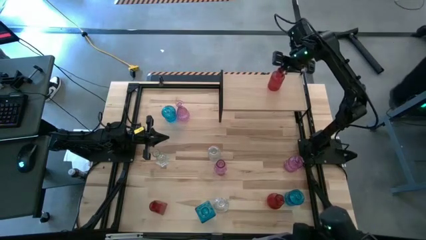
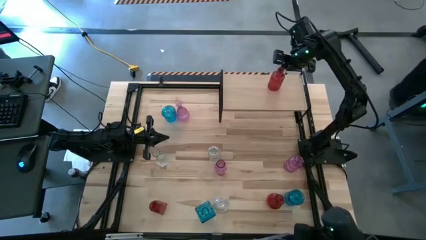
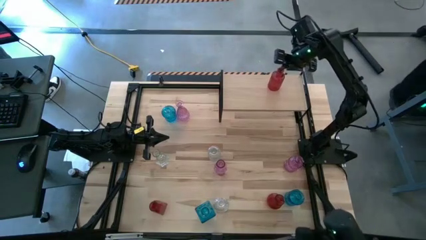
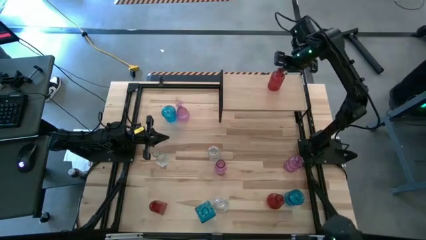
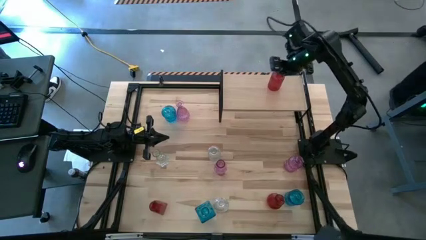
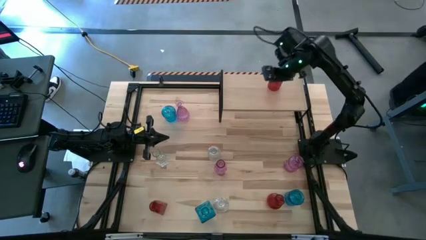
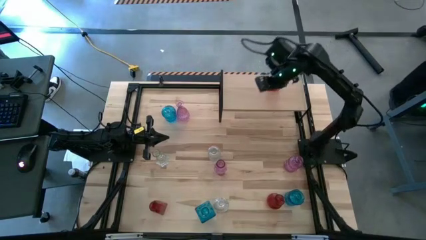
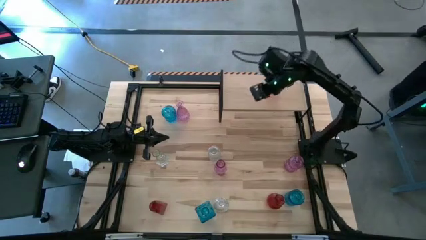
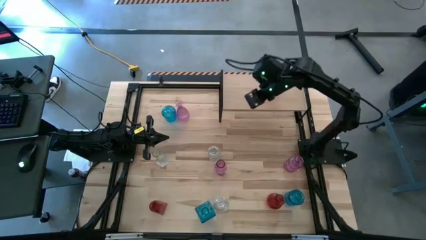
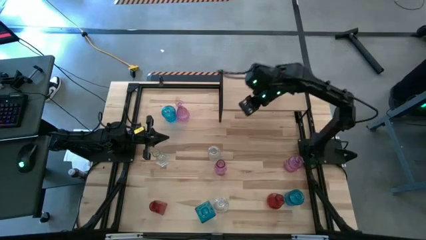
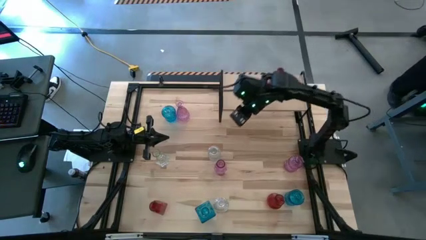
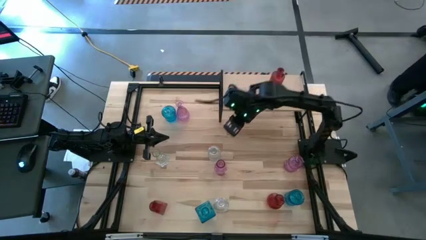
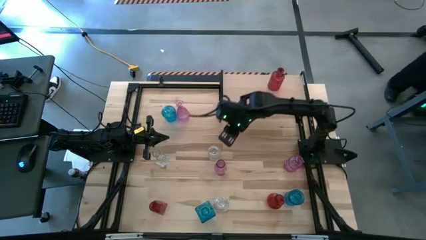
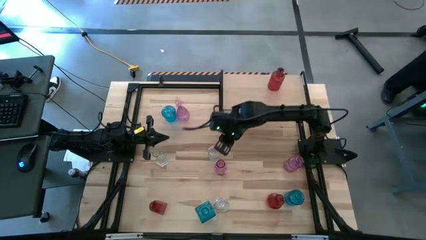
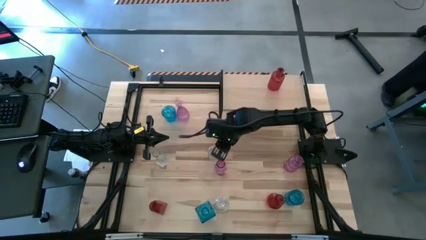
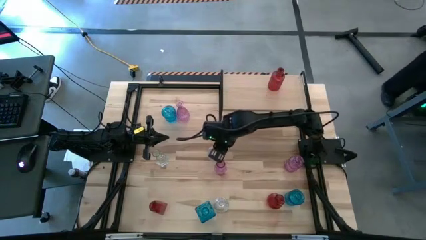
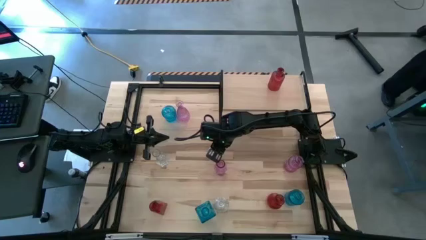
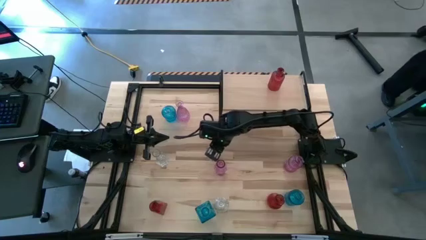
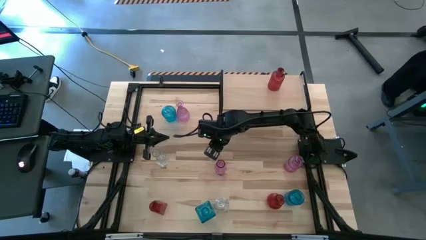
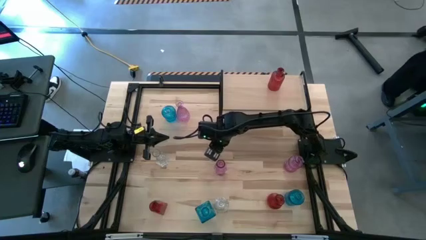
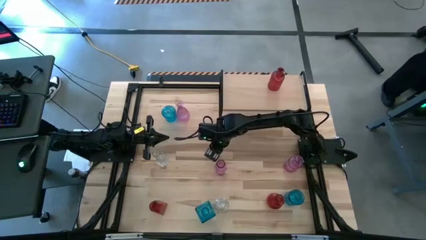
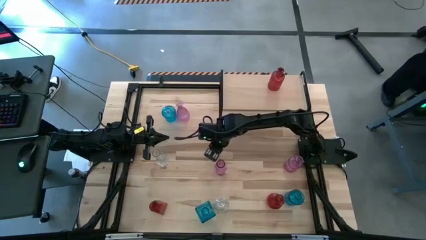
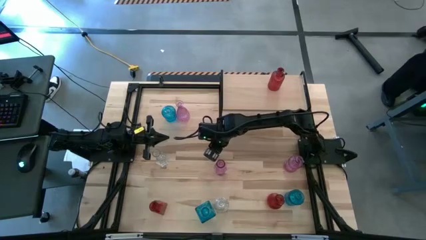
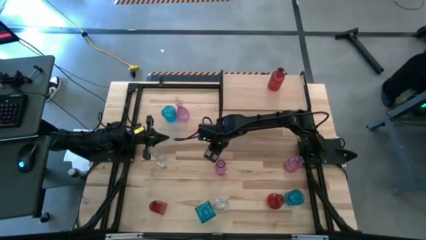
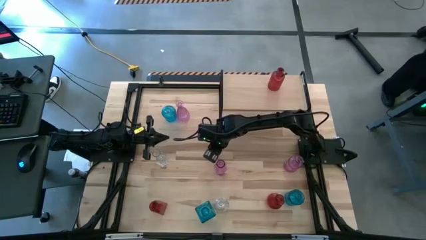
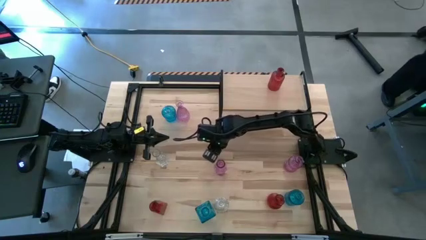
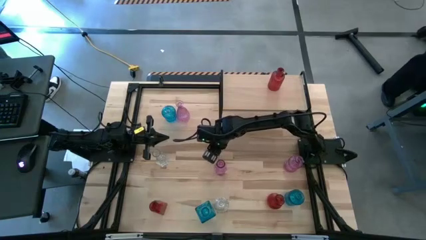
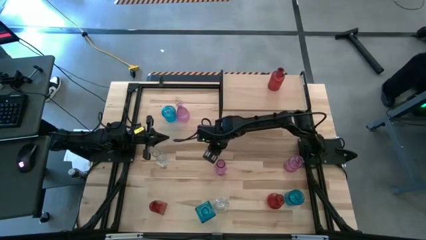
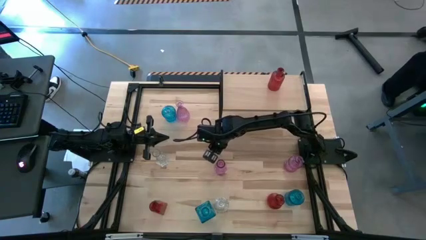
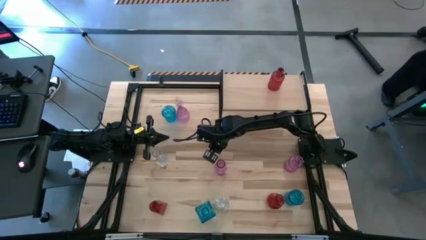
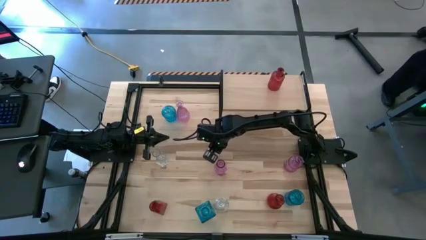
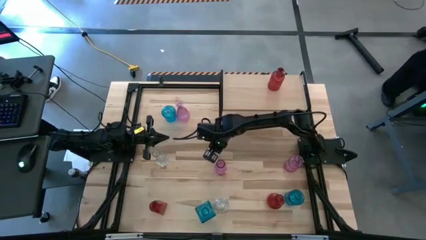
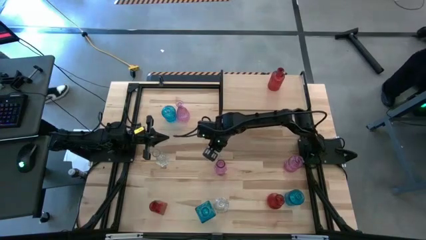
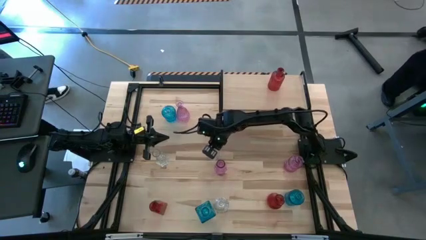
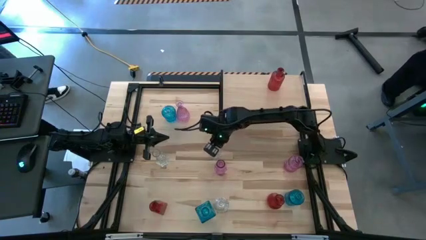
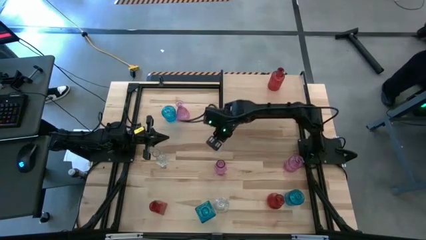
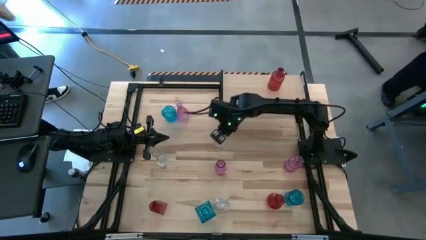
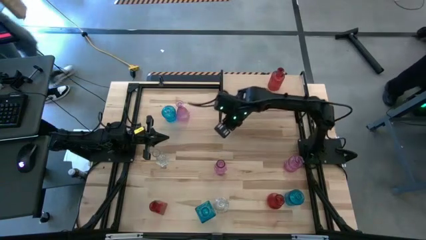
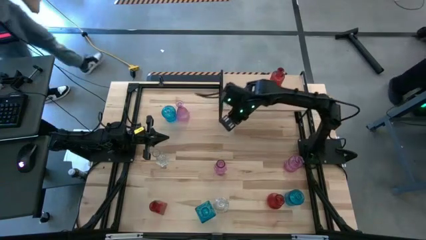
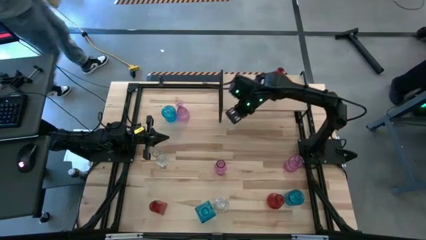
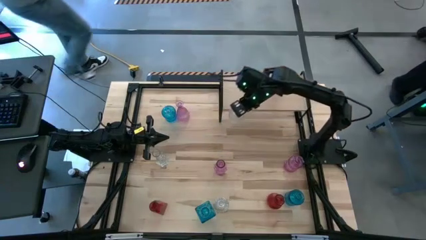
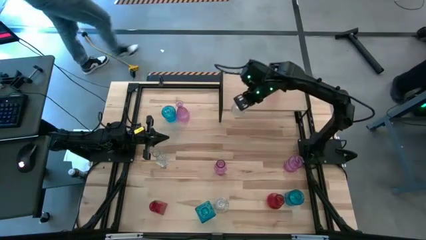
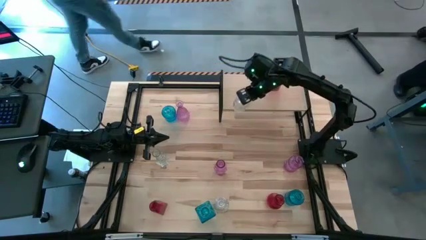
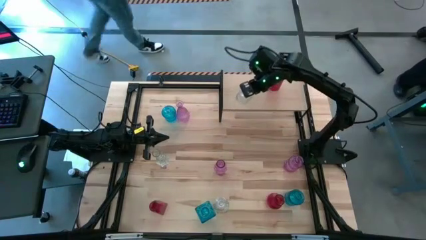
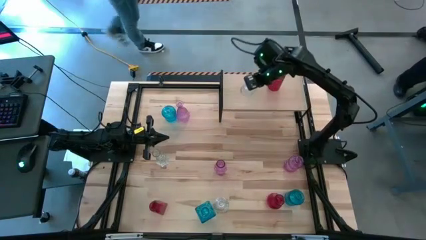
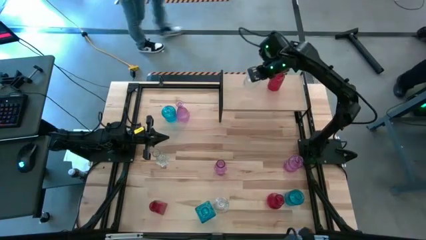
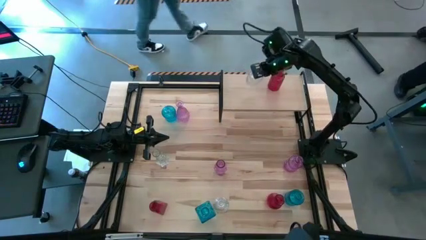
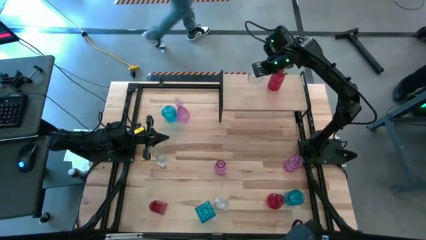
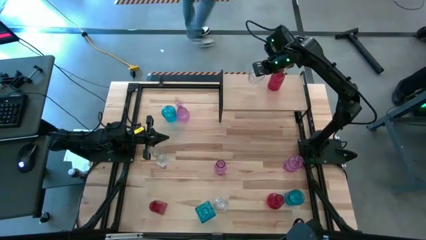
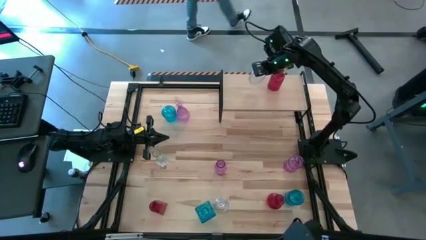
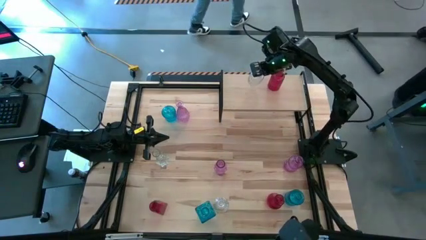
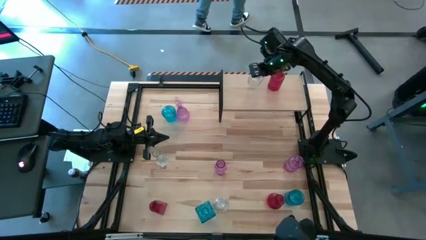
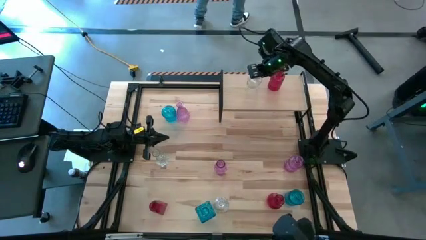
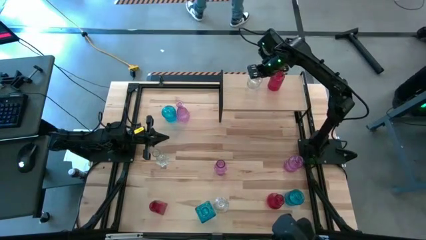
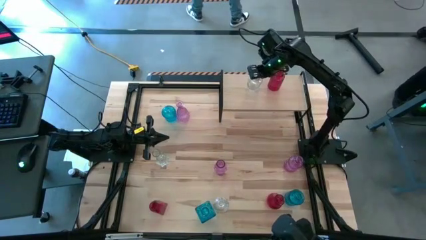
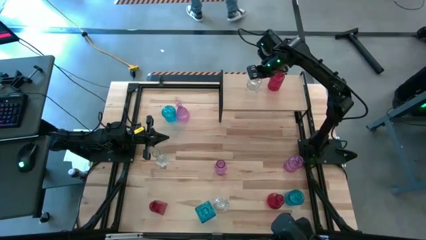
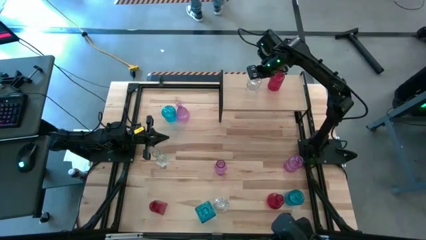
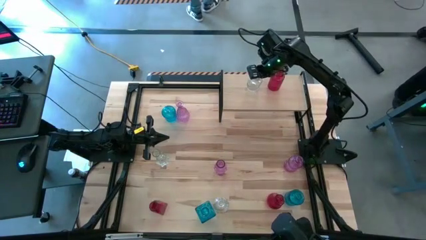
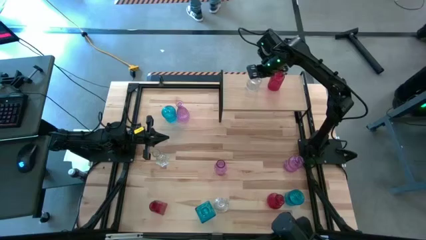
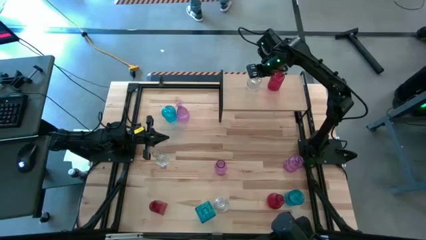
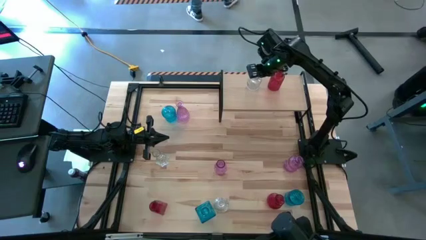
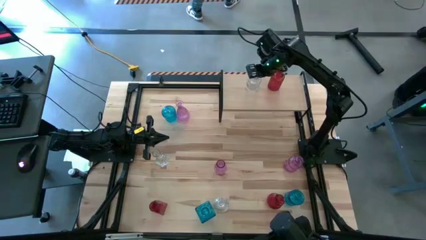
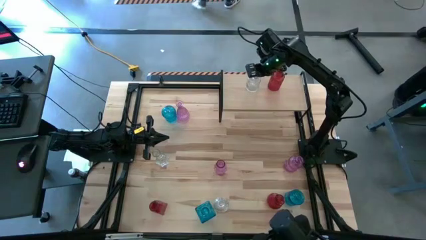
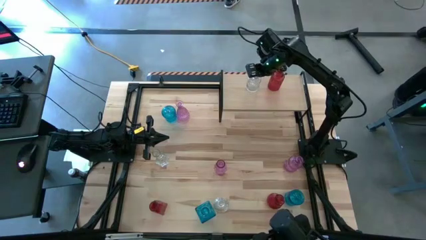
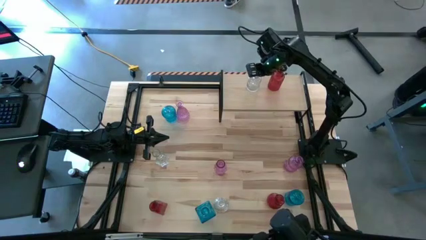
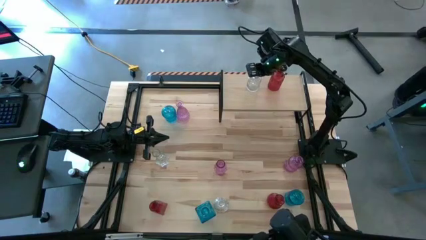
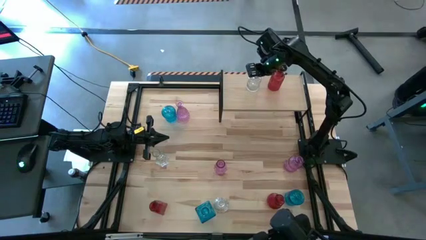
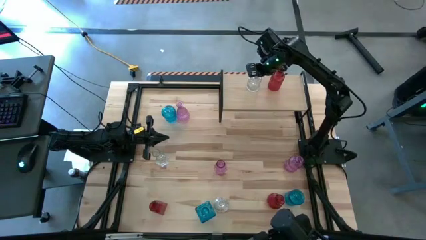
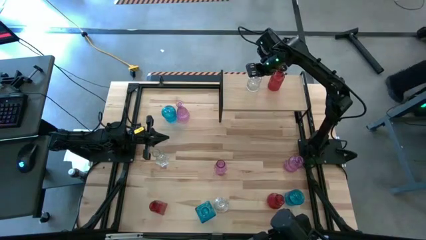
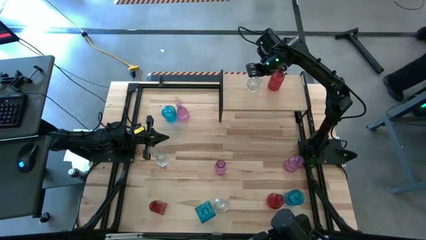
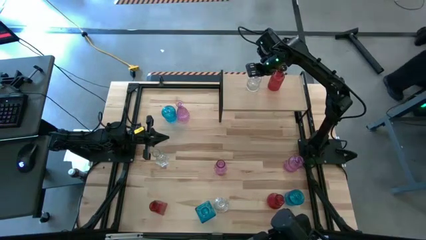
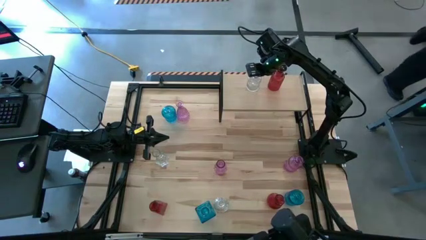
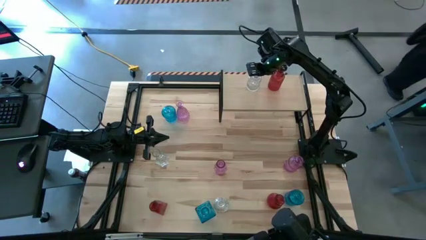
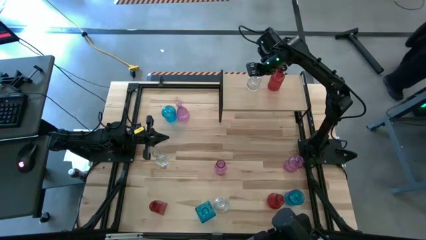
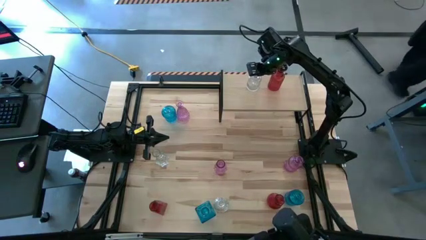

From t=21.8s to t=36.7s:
Task: sort vases onto shelf
Put the top right transparent vase on the shelf
